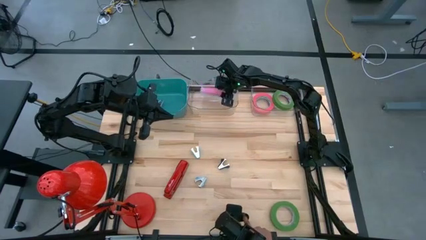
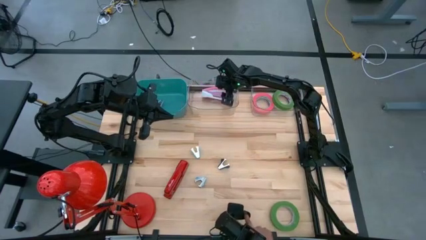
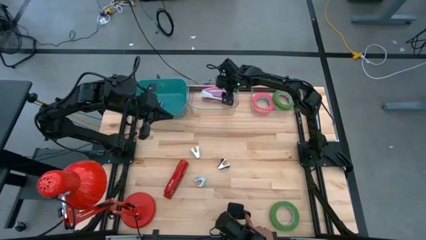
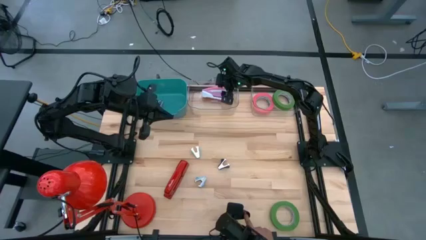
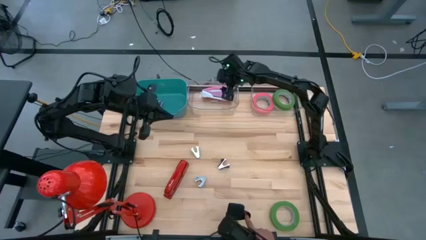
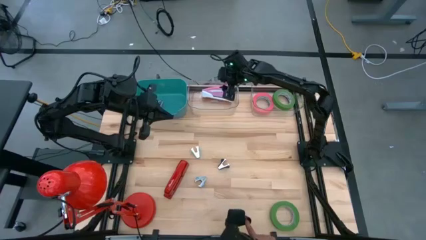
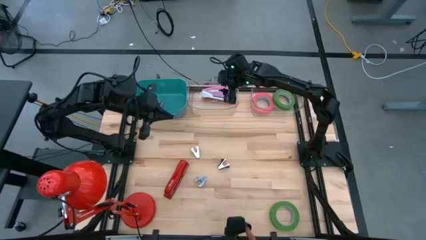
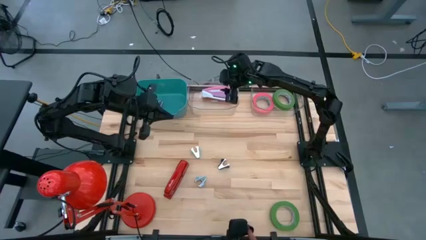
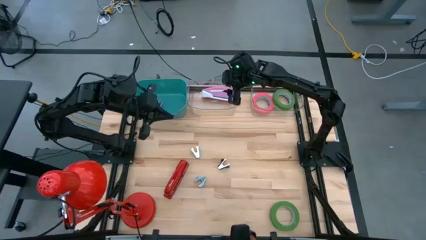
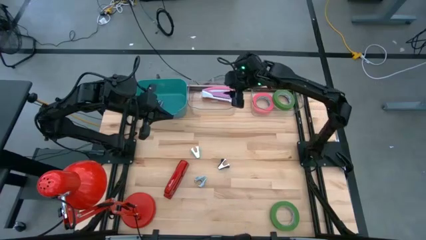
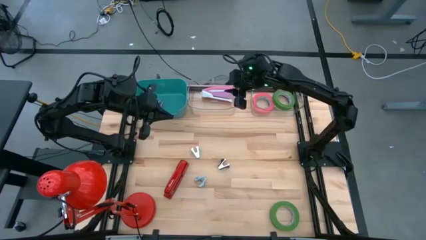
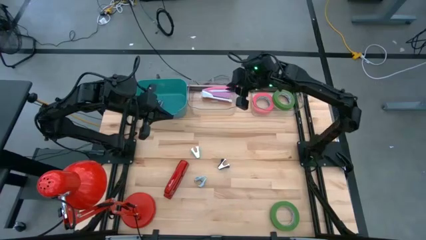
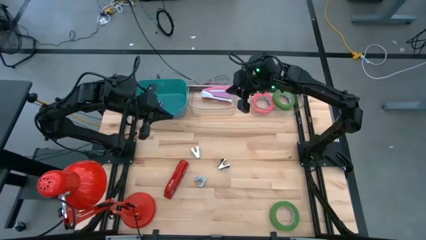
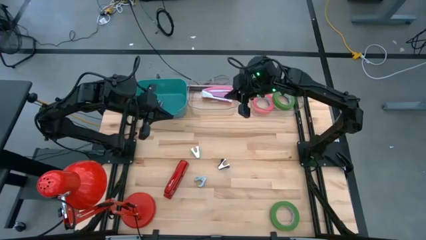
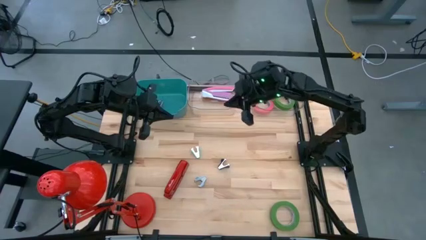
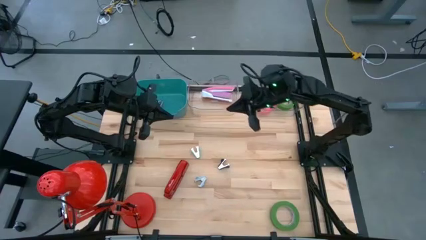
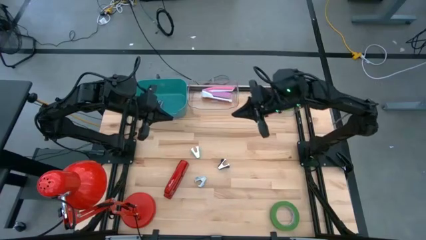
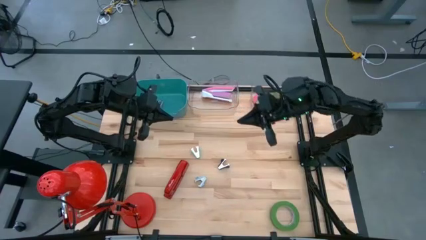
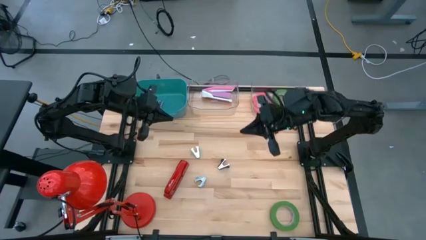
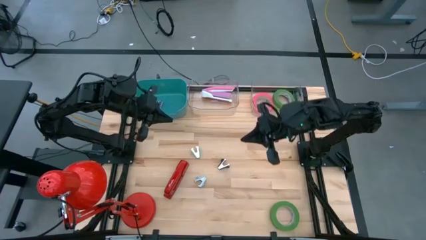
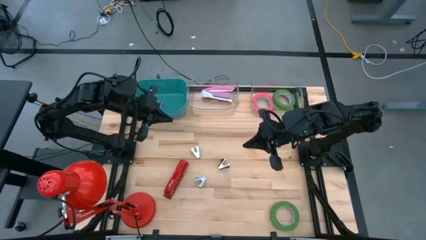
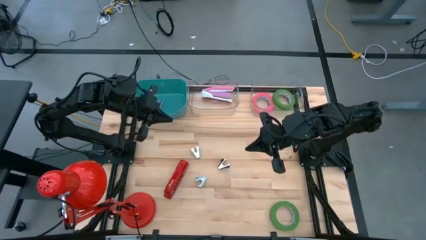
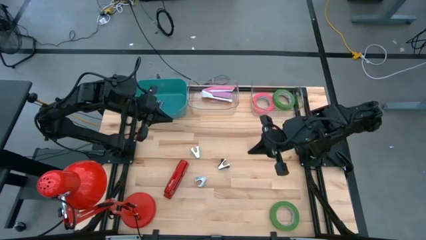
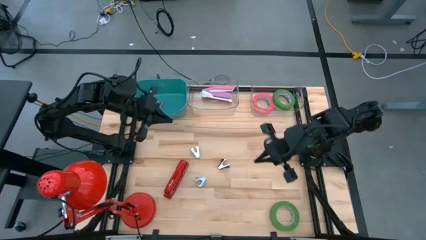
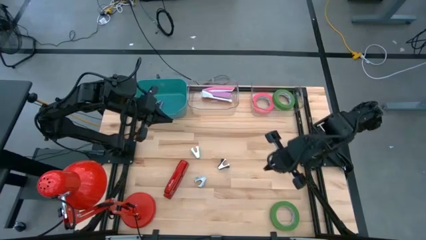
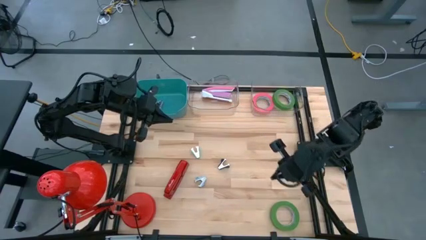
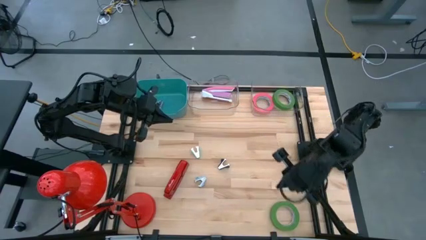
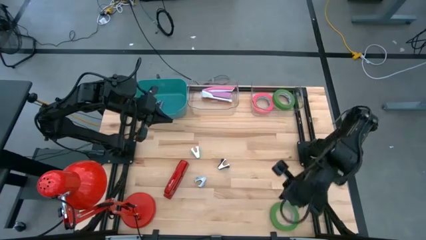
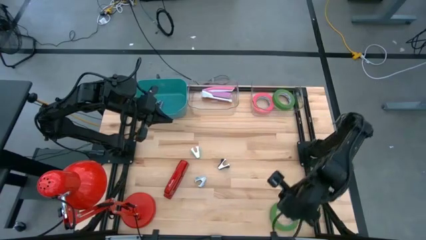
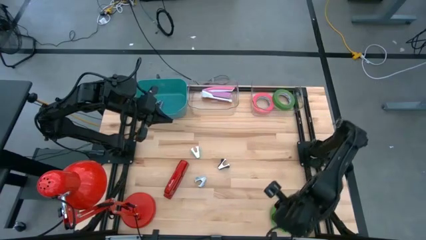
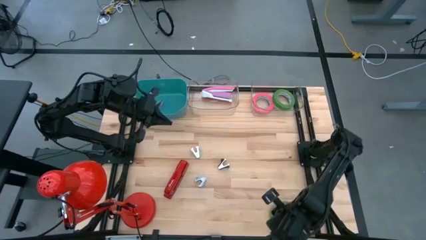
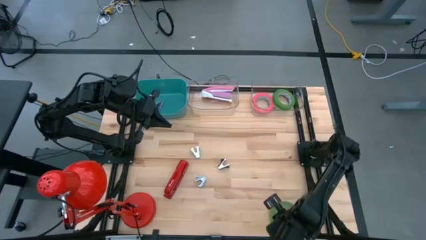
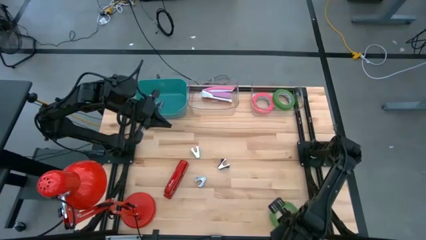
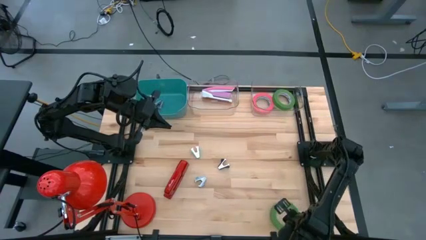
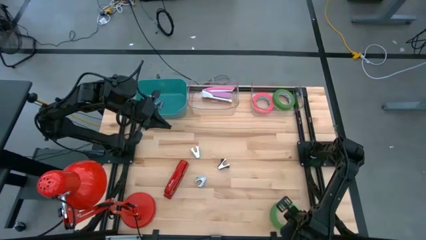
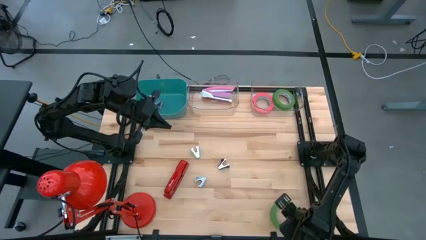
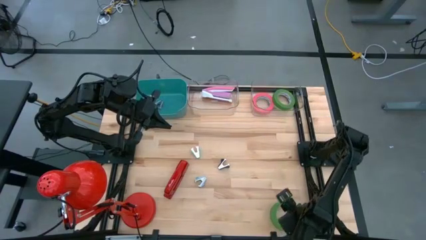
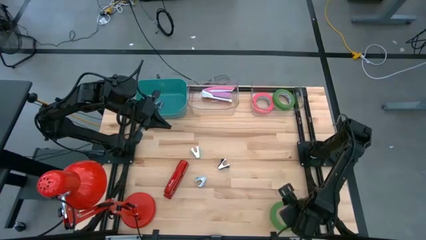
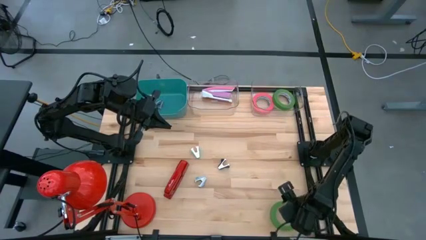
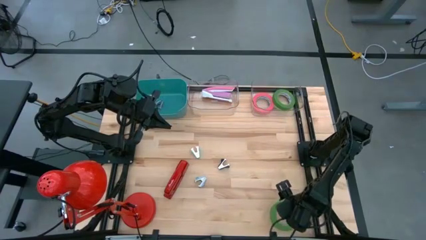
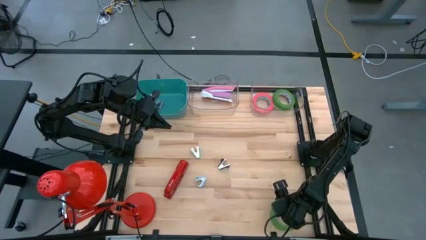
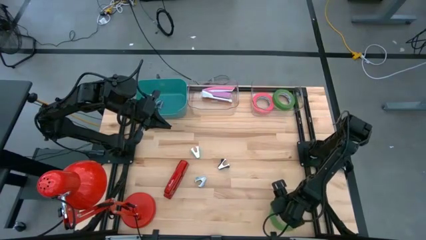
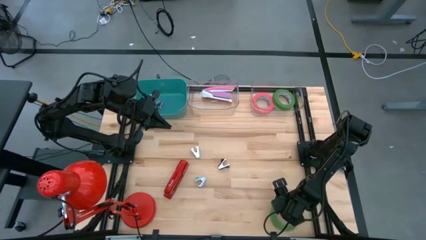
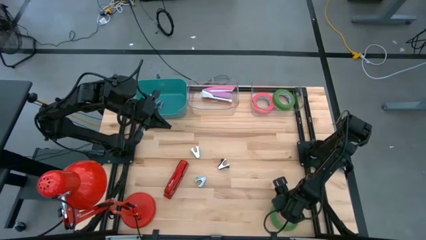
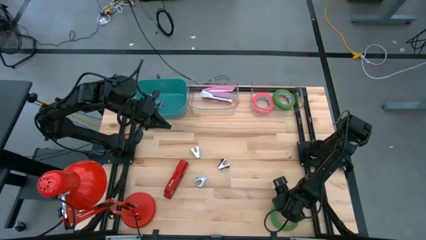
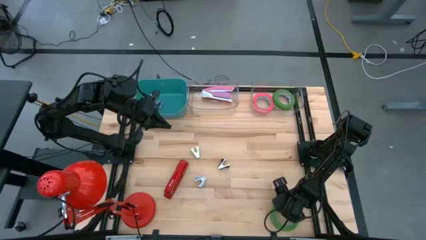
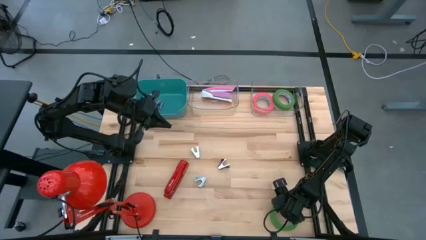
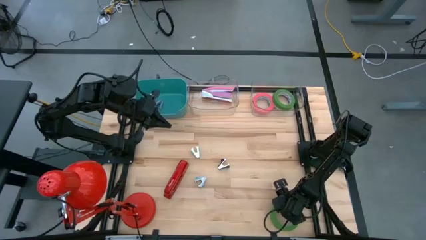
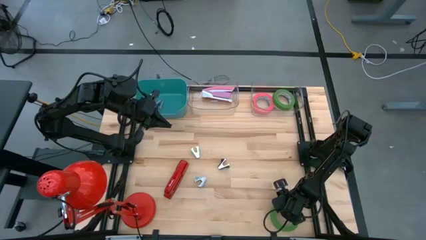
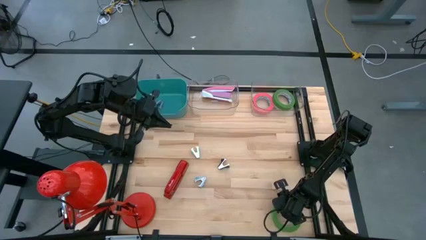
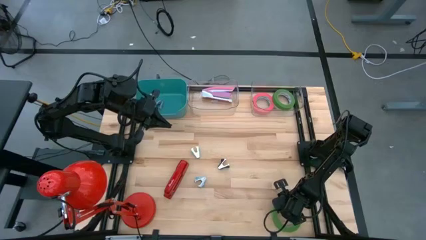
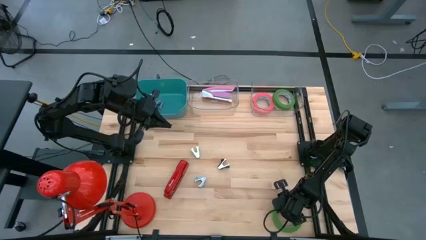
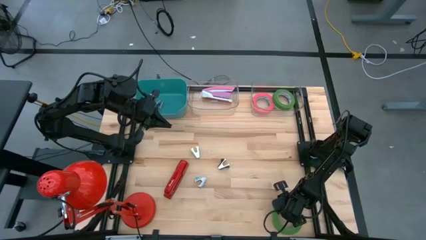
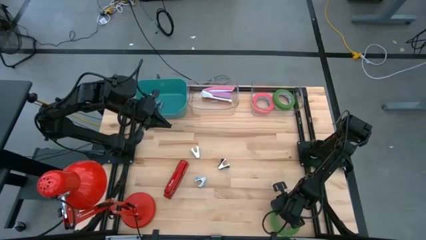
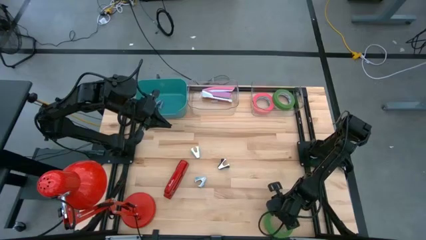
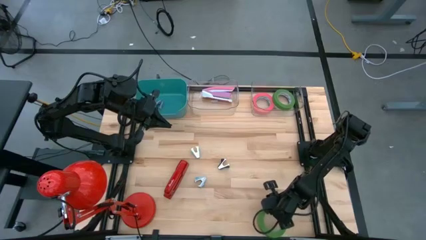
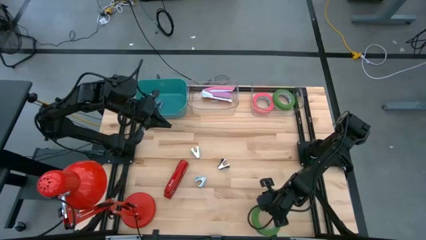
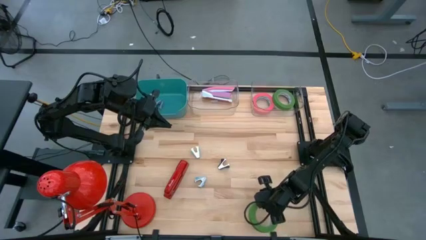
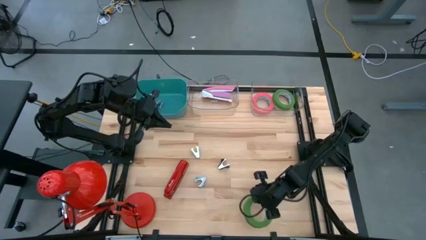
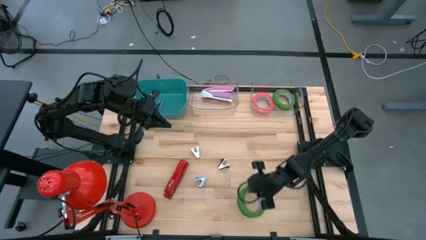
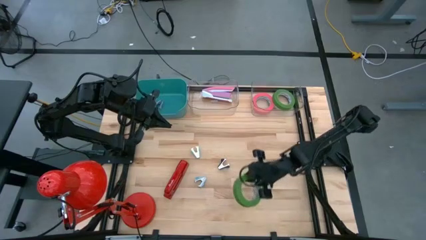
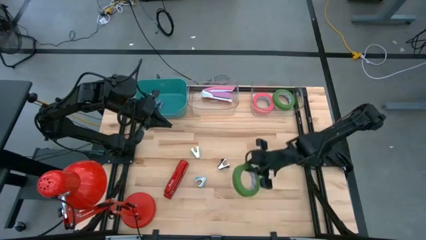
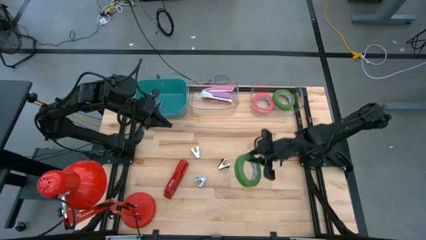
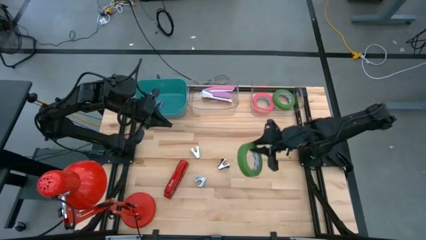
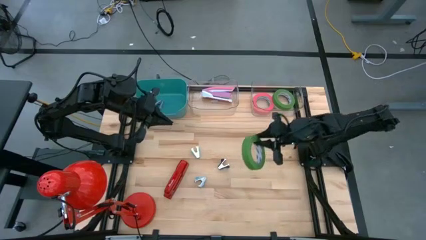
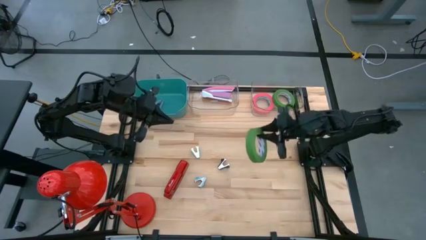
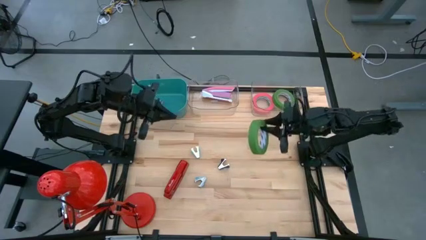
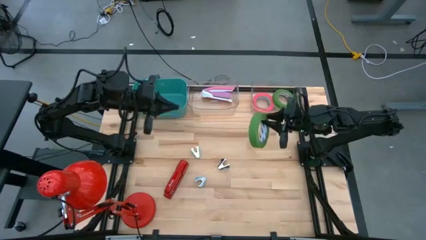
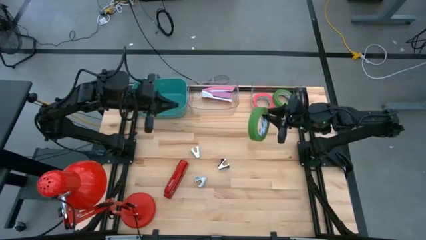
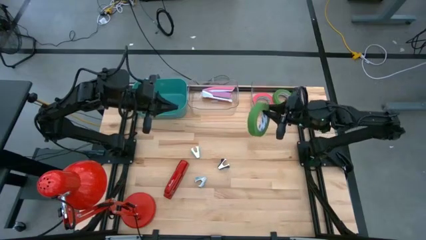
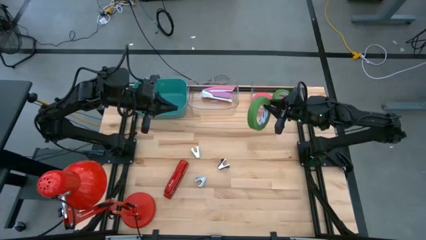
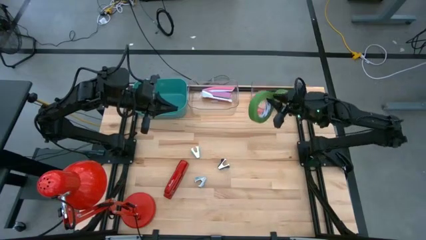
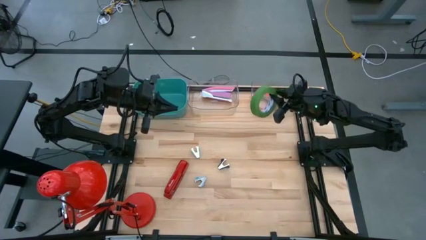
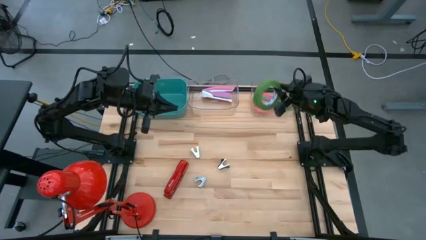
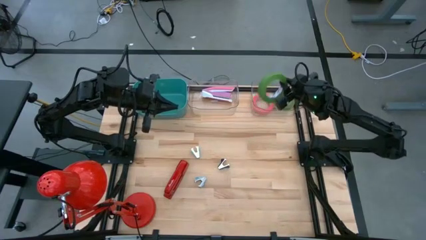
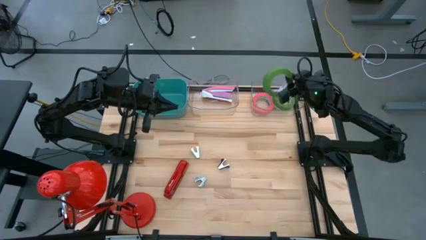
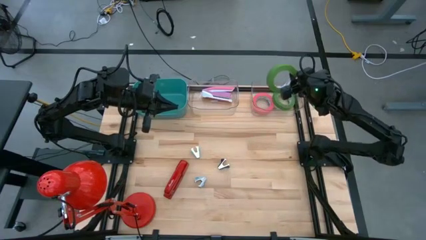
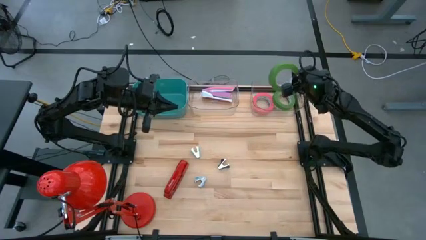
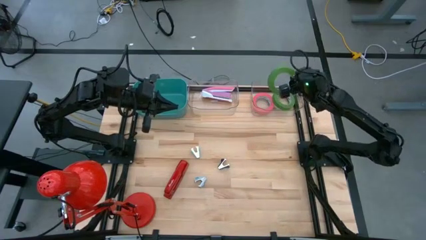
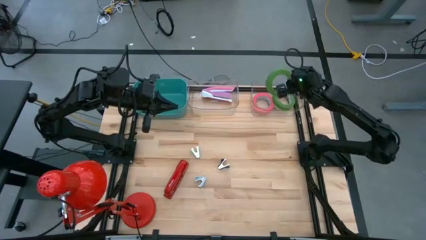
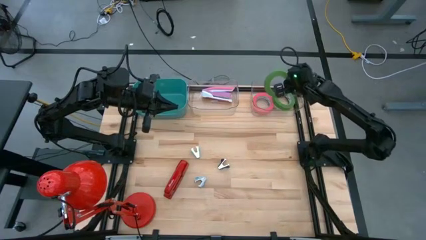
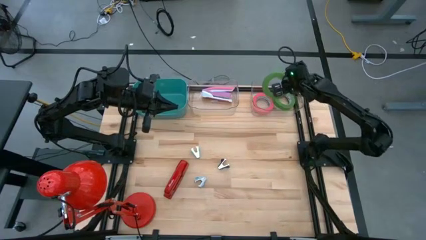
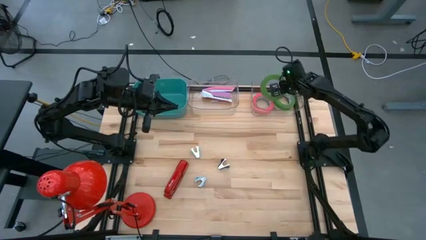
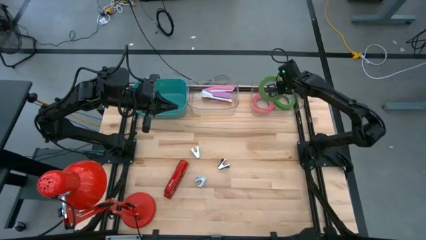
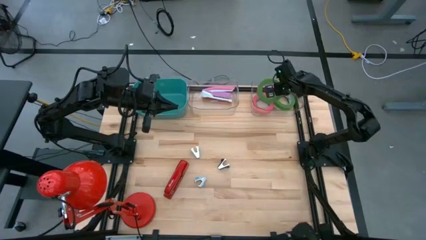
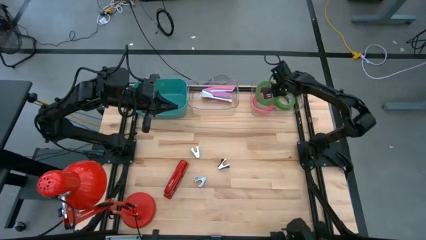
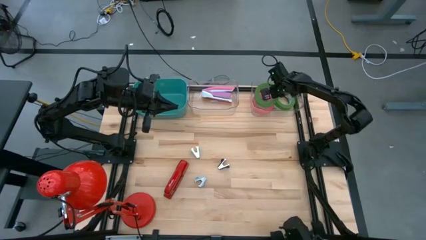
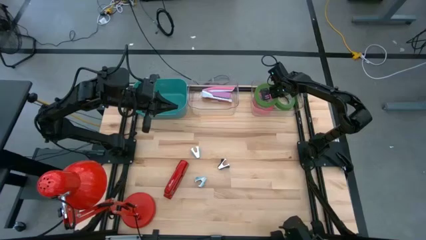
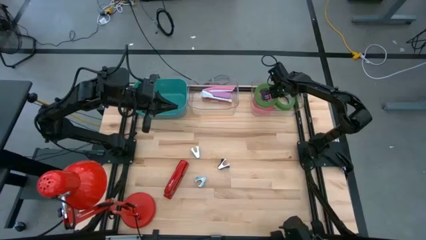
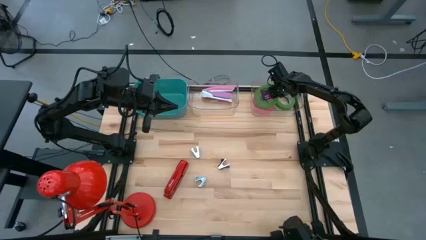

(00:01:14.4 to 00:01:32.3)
Task: Pick and place Stapler, Stapler remover, tape
Put the green tape into the right transparent bin
